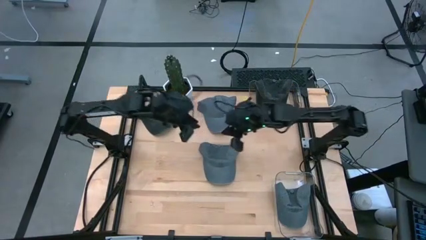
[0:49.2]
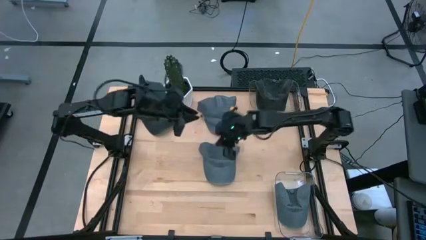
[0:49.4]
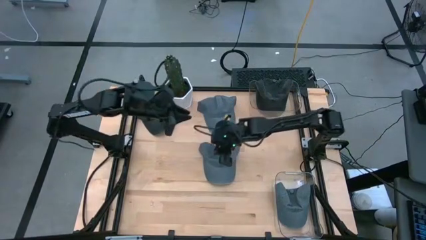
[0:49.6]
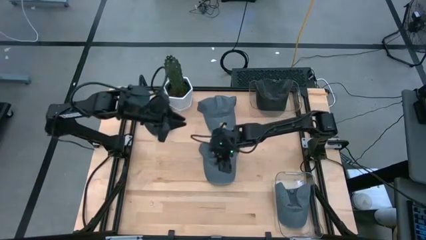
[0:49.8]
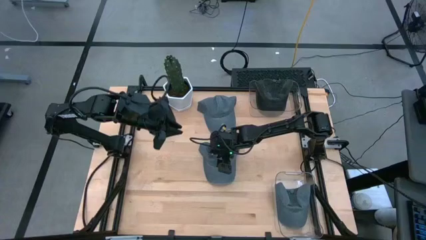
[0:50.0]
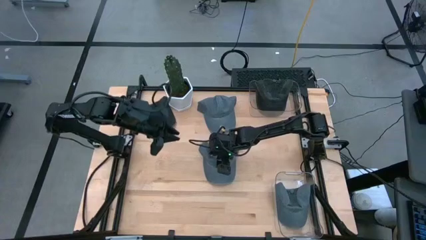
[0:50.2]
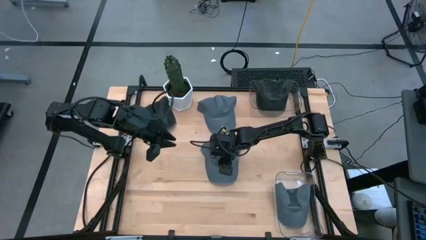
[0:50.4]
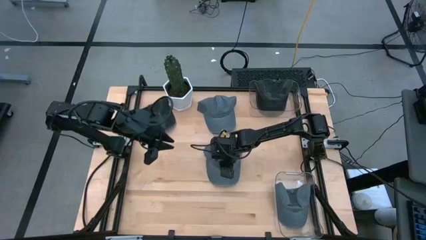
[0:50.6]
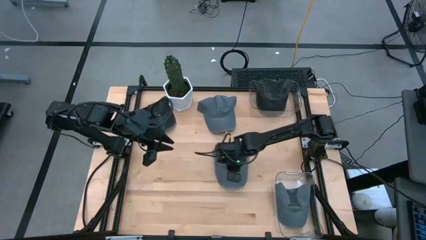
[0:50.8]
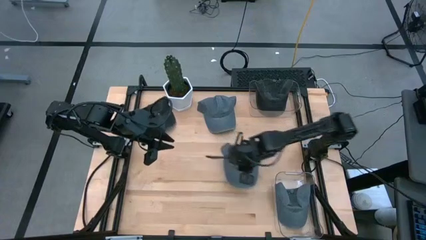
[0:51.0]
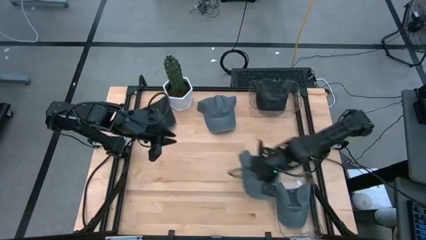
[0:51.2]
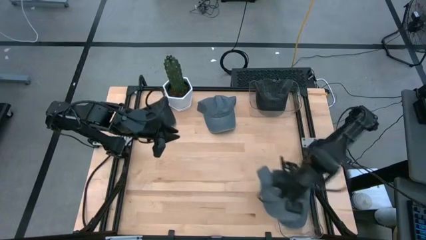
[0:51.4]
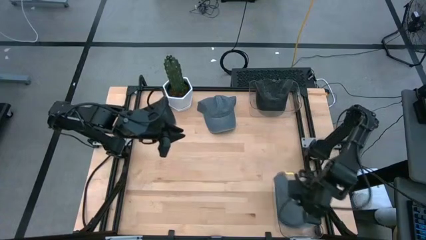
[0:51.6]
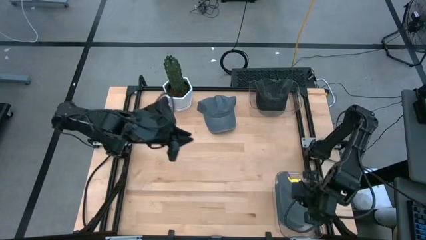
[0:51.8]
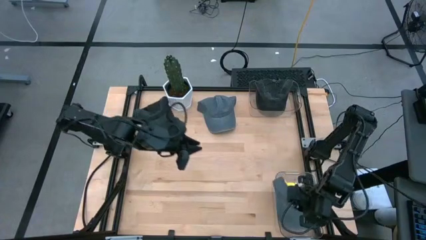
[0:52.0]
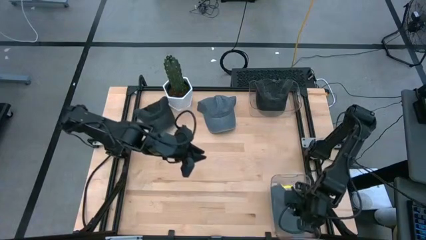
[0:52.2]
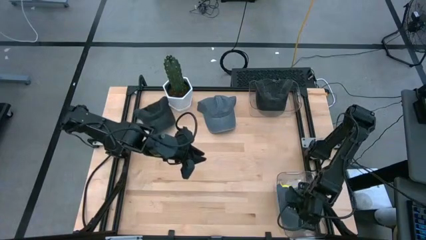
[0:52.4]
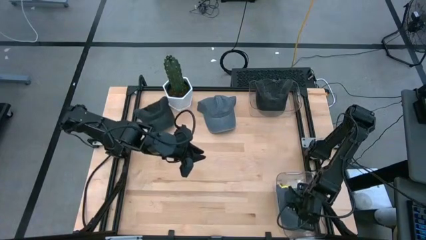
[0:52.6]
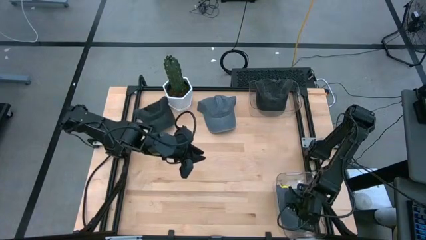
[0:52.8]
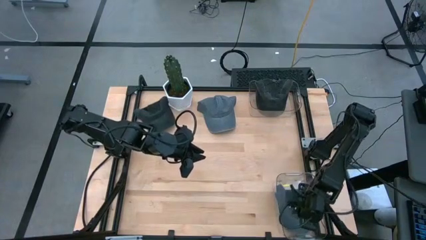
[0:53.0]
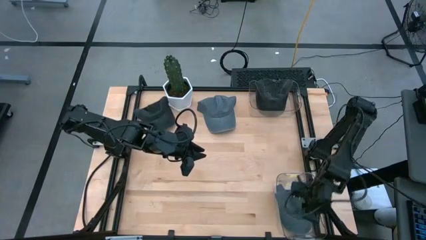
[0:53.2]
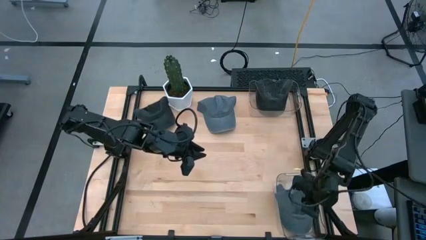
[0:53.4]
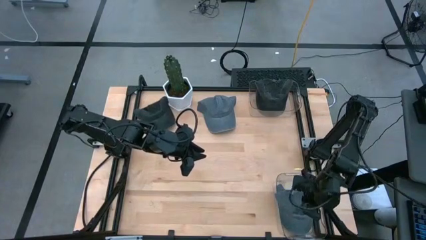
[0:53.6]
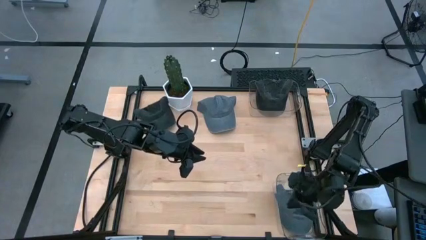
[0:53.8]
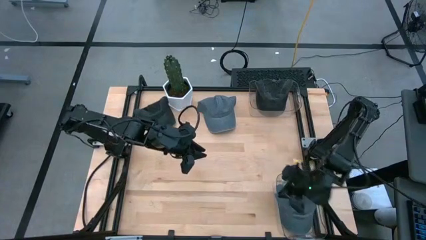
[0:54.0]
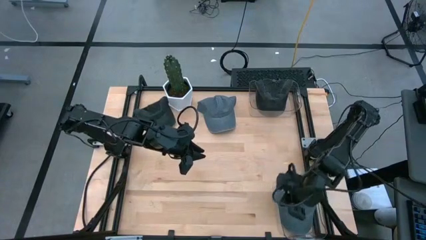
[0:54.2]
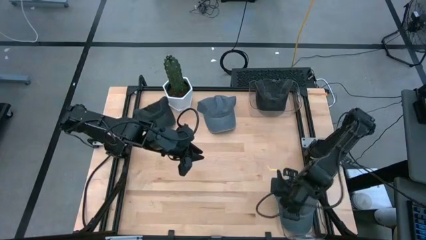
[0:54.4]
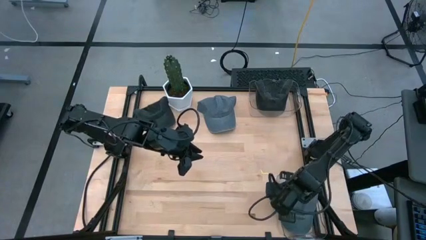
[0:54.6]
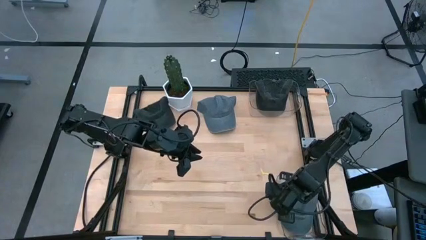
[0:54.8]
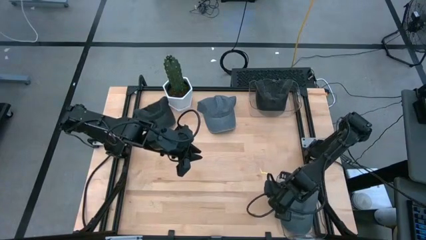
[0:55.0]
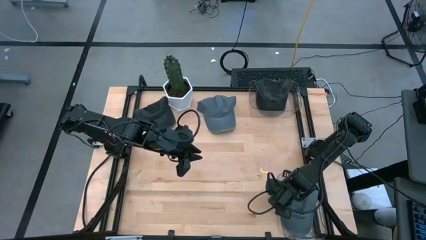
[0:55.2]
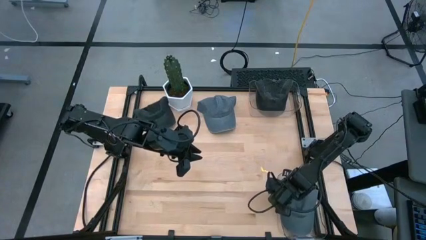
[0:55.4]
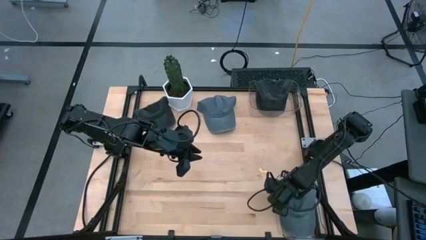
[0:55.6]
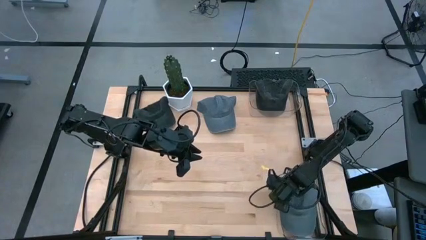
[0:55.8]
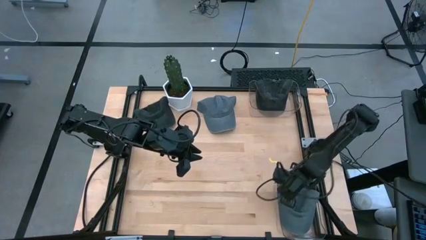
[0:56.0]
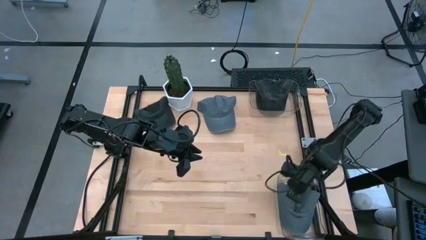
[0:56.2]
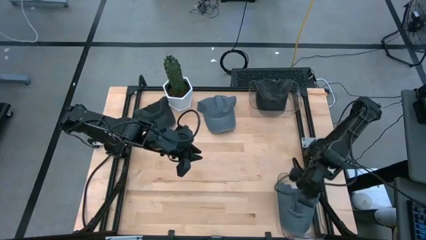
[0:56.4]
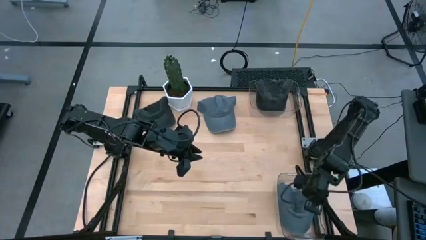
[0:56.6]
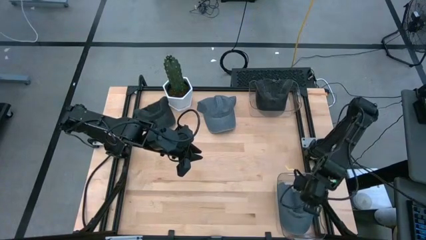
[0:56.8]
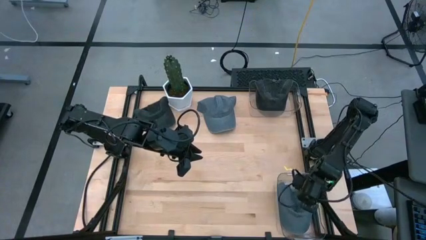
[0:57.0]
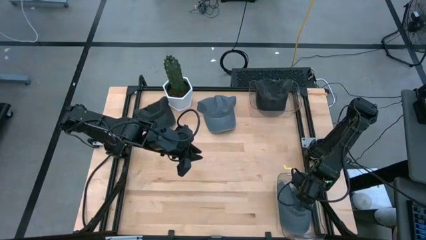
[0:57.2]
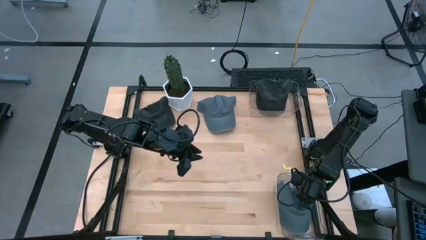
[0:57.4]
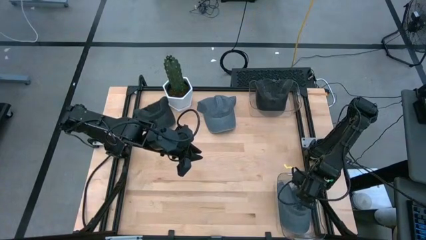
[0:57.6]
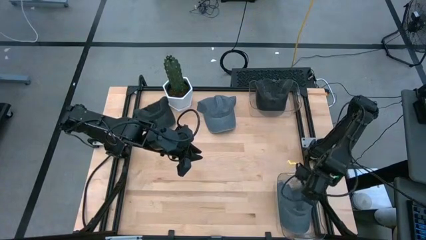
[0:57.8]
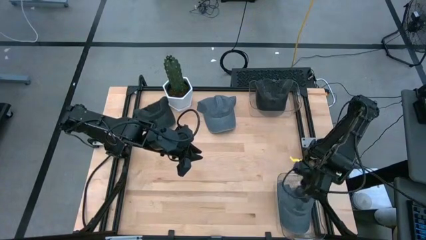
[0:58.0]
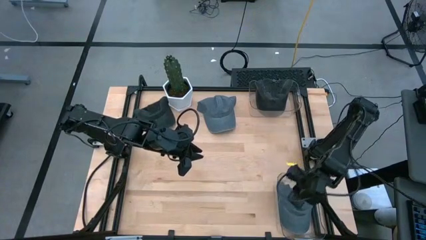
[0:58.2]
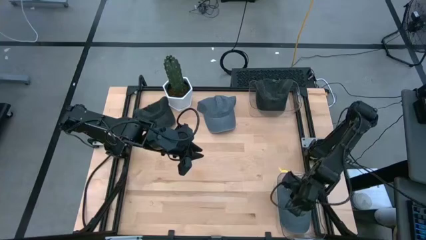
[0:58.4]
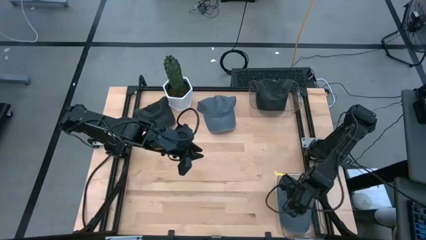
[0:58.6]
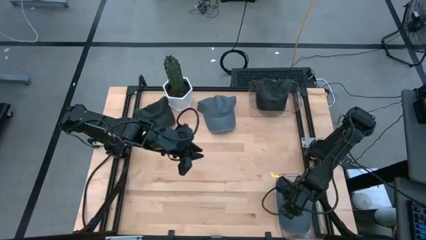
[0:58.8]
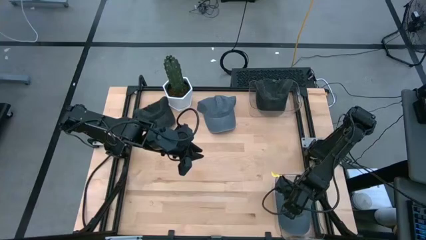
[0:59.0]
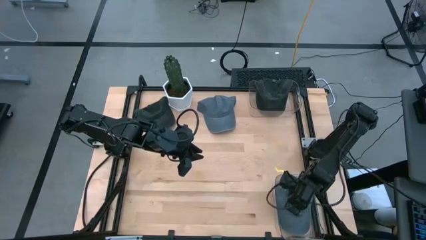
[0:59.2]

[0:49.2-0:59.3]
Task: Pick & Place hat
Put the bottom gray cap into the bottom transparent bin

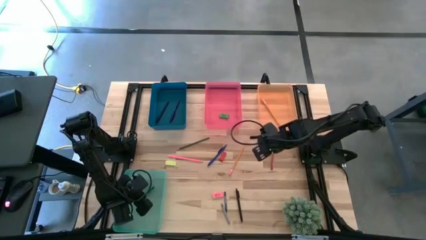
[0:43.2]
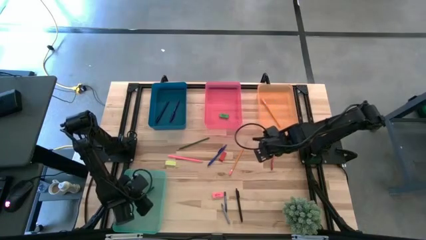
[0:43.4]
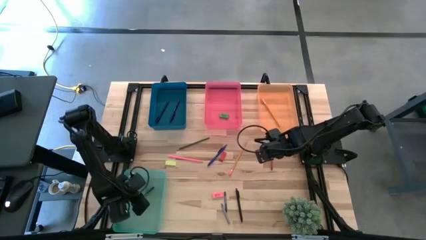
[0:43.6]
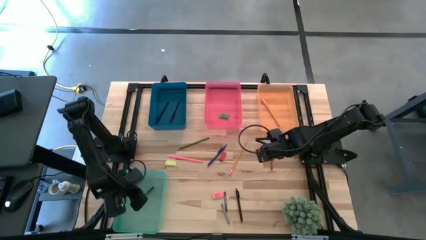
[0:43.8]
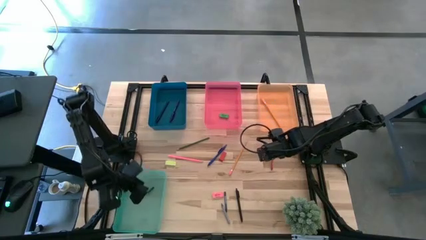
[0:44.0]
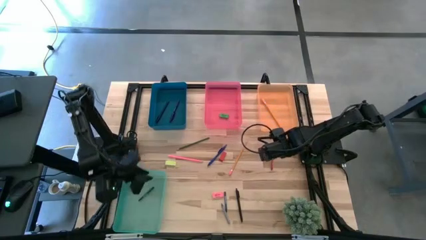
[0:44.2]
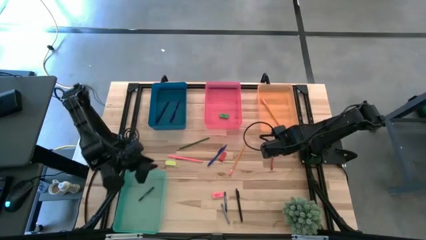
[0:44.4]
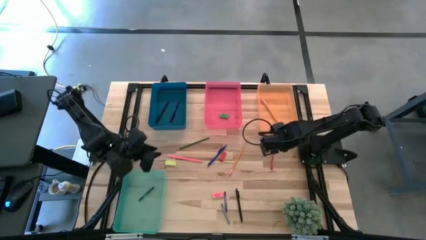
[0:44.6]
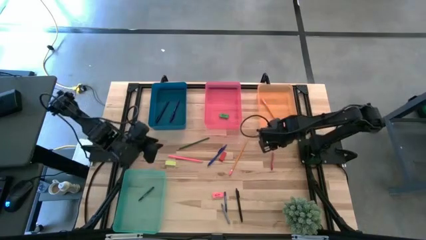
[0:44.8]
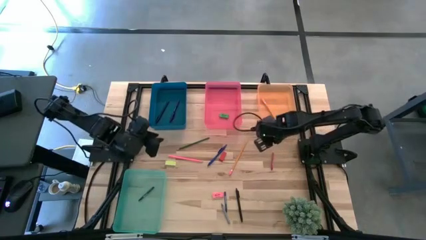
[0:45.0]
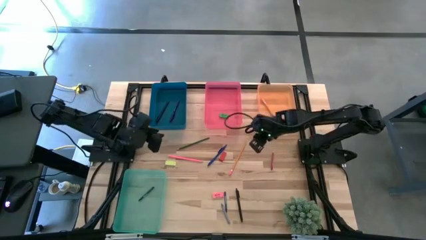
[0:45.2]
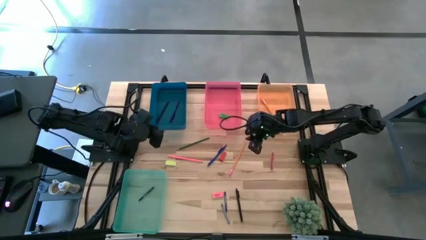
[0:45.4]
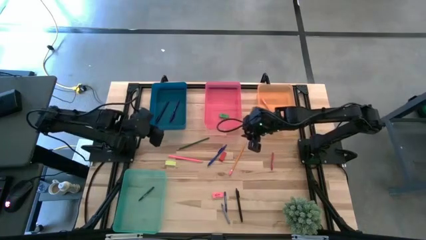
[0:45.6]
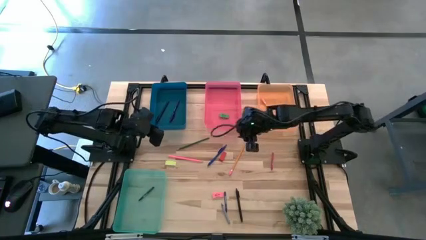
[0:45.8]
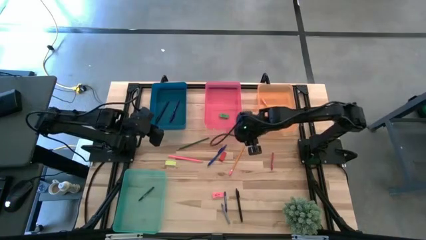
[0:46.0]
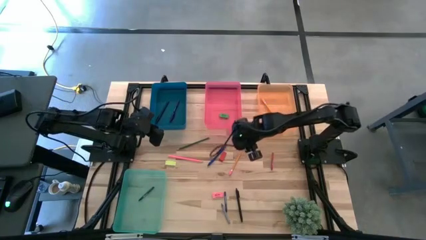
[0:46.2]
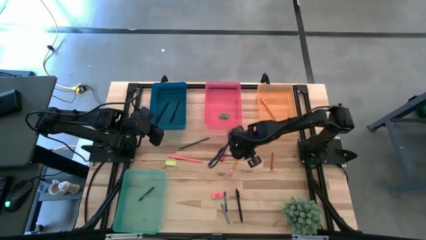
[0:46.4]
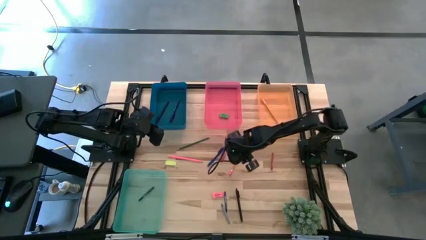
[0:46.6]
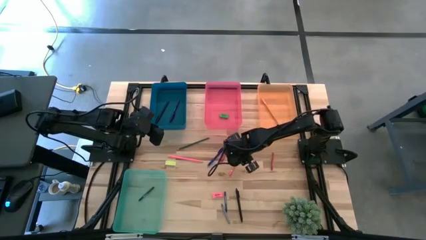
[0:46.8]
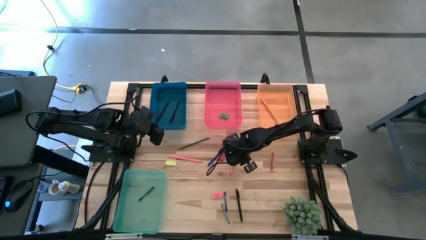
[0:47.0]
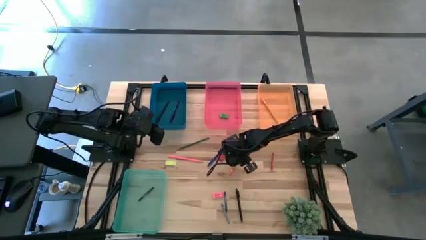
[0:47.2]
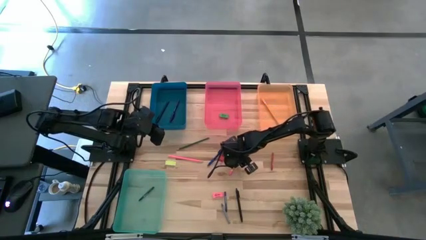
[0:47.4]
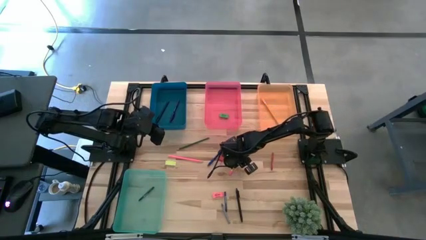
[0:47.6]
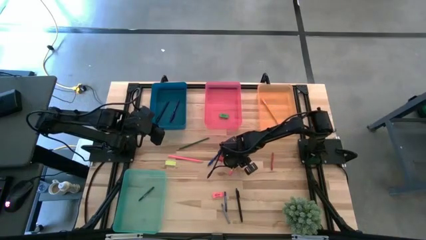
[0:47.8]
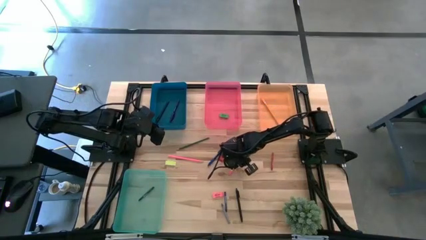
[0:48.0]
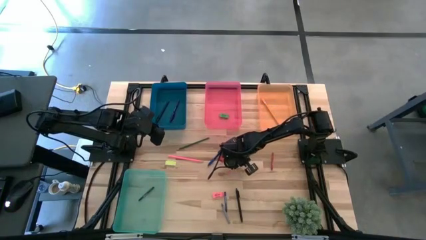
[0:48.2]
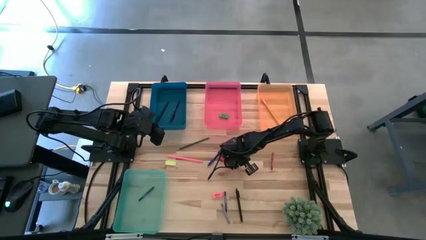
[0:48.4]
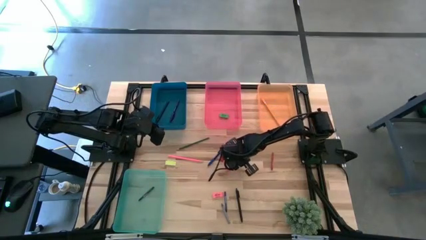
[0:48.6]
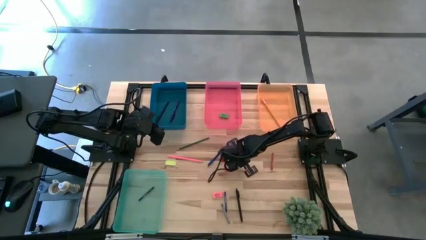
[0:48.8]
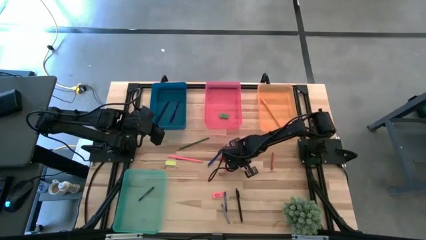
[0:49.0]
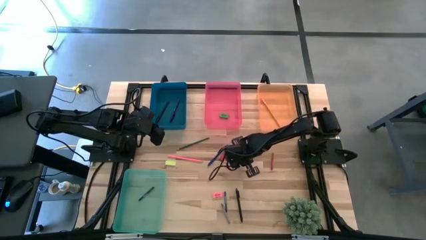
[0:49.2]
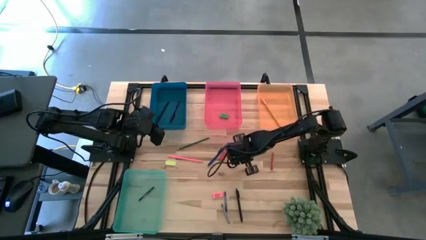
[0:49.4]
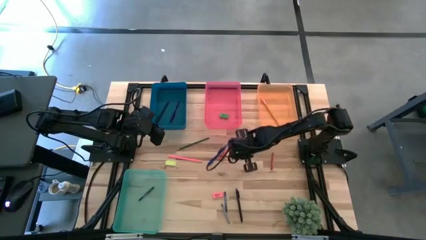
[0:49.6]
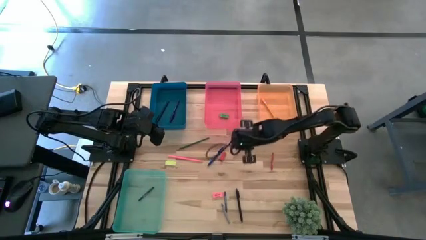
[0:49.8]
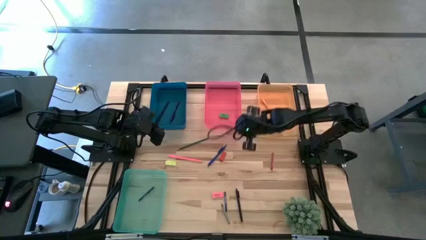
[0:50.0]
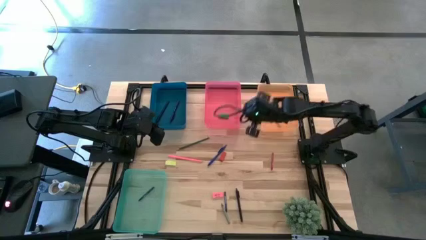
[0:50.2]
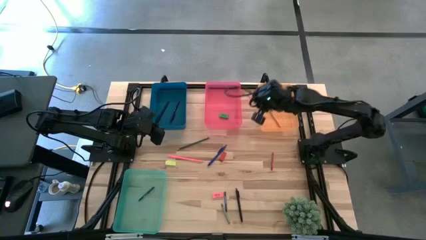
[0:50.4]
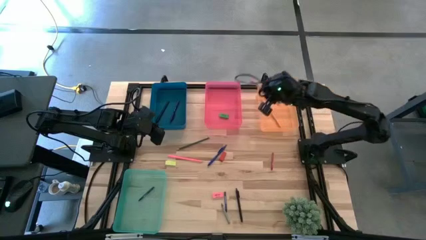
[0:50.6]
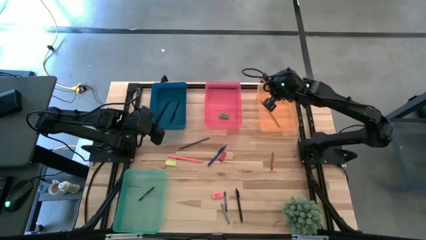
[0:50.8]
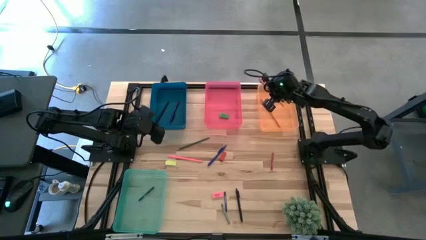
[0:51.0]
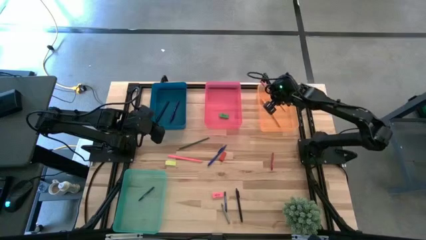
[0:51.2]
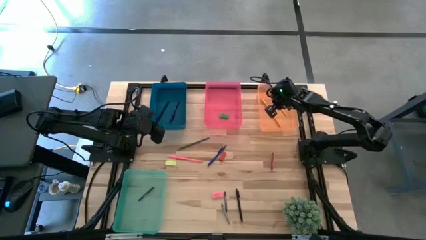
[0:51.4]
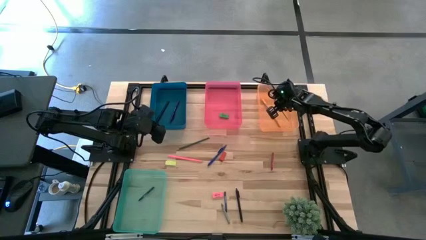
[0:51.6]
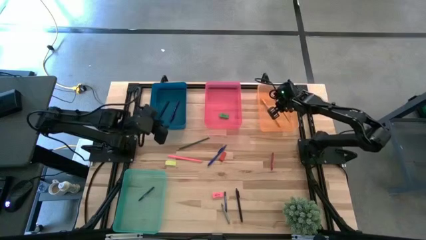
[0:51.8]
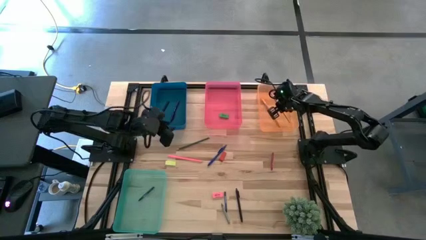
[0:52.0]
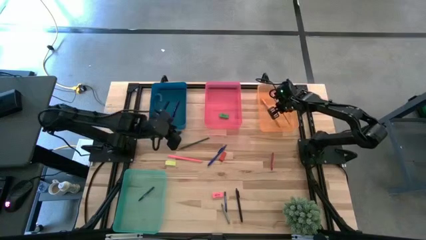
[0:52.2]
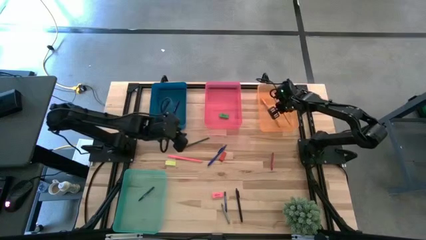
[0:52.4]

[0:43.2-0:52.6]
Task: Sort crayons/erasers/pens/pencils in bins
Put the orange pencil into the orange bin
